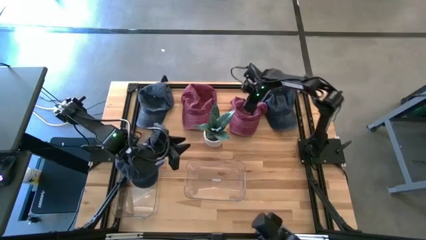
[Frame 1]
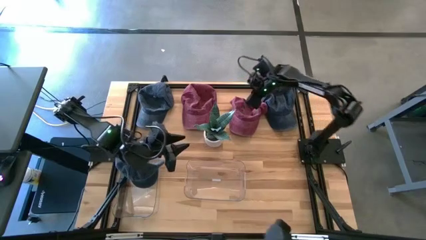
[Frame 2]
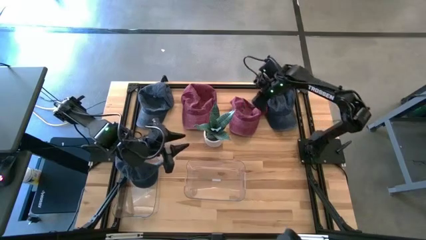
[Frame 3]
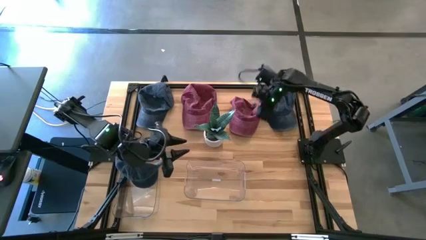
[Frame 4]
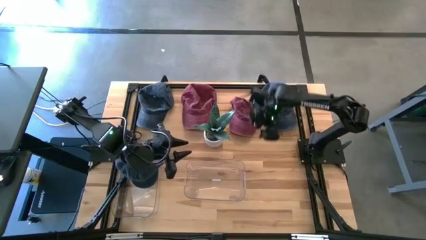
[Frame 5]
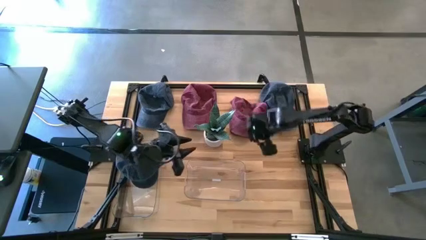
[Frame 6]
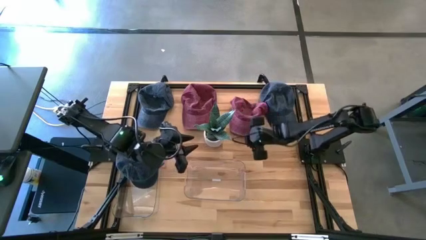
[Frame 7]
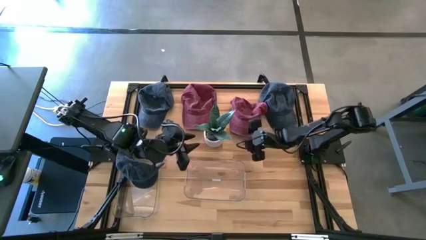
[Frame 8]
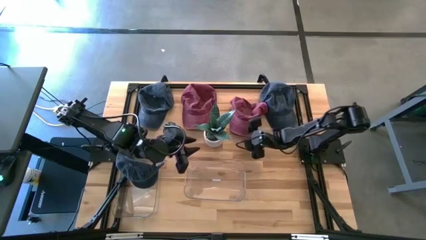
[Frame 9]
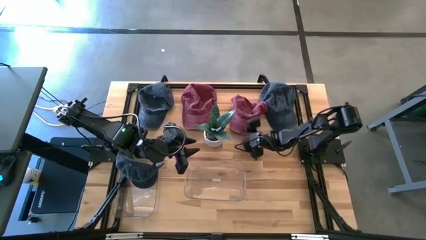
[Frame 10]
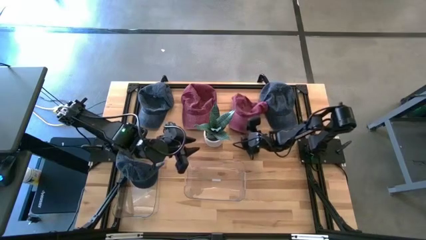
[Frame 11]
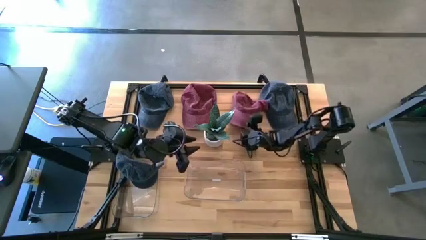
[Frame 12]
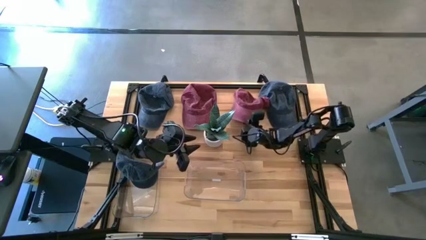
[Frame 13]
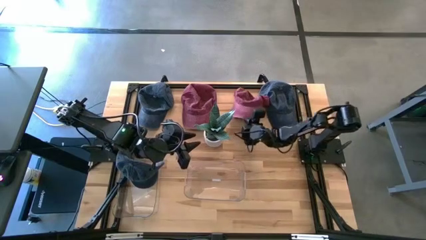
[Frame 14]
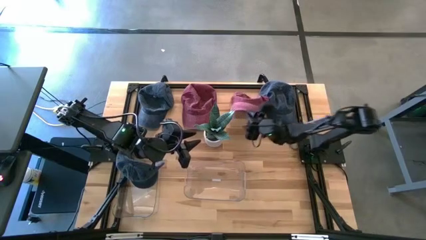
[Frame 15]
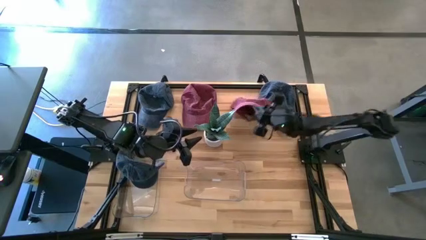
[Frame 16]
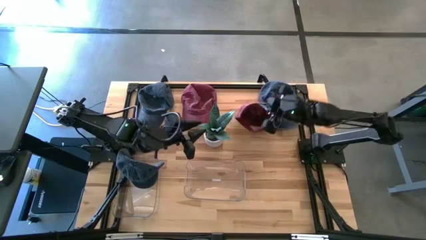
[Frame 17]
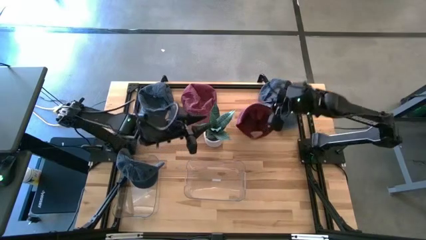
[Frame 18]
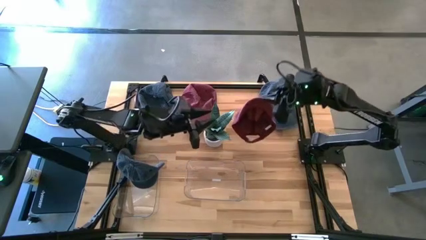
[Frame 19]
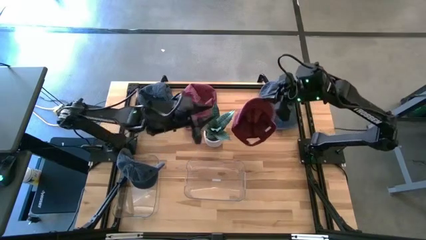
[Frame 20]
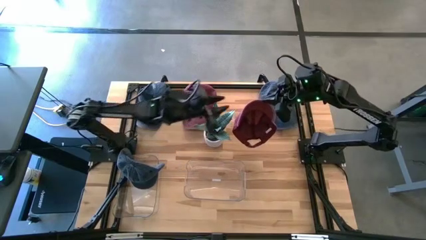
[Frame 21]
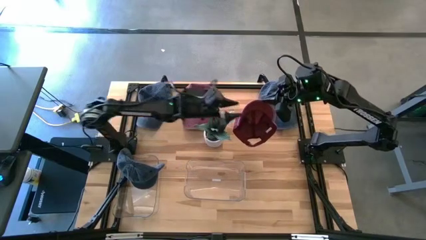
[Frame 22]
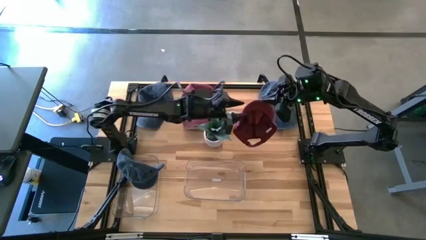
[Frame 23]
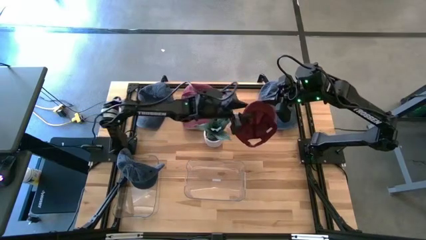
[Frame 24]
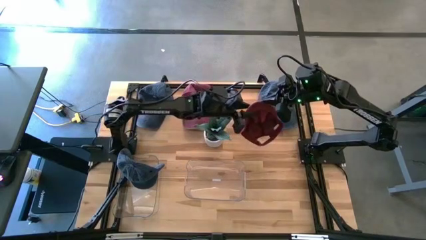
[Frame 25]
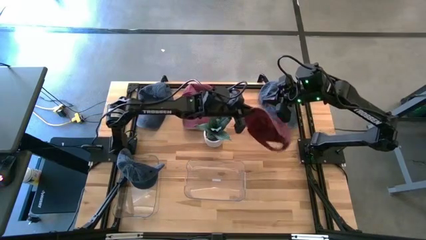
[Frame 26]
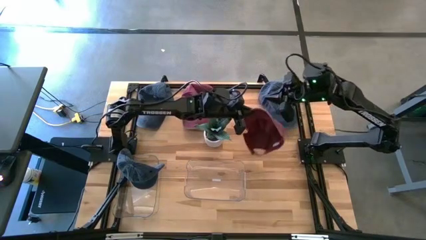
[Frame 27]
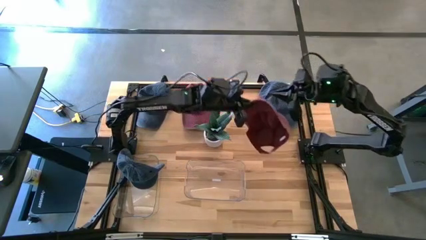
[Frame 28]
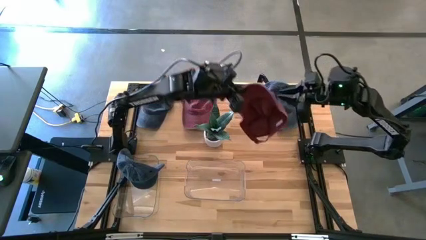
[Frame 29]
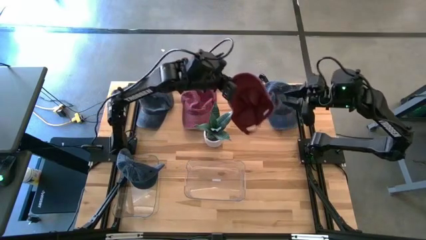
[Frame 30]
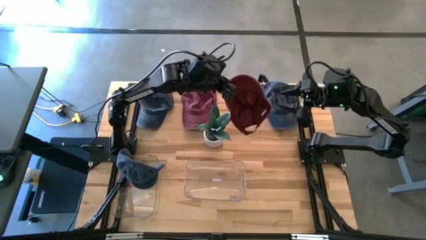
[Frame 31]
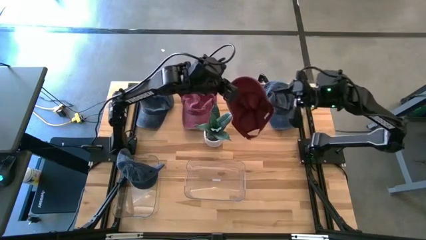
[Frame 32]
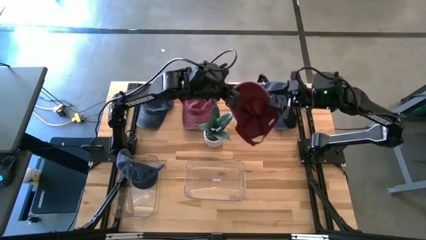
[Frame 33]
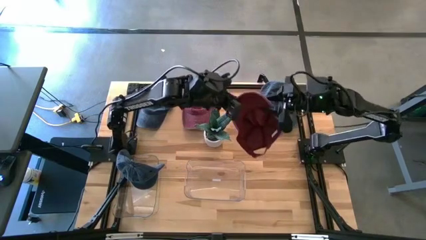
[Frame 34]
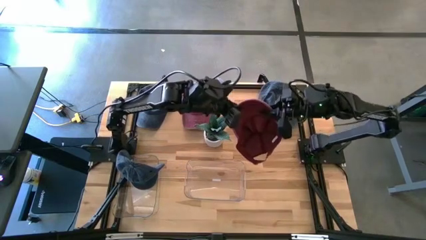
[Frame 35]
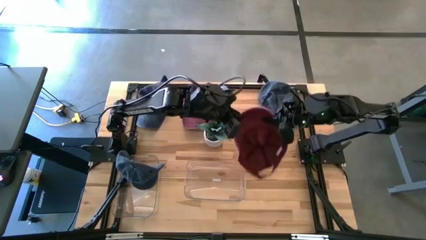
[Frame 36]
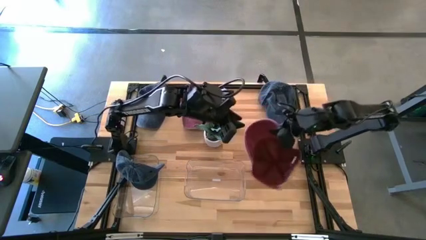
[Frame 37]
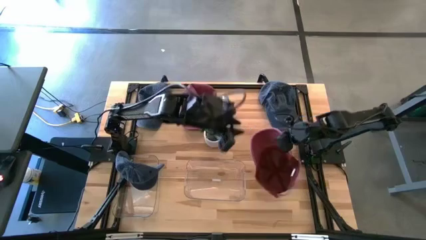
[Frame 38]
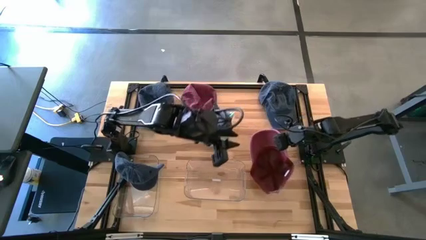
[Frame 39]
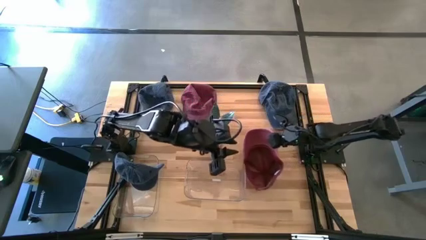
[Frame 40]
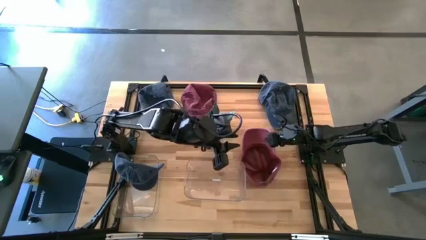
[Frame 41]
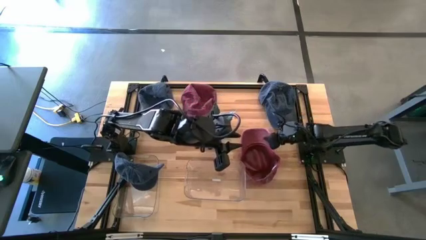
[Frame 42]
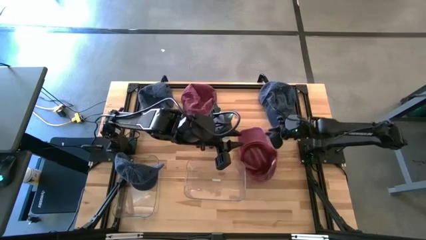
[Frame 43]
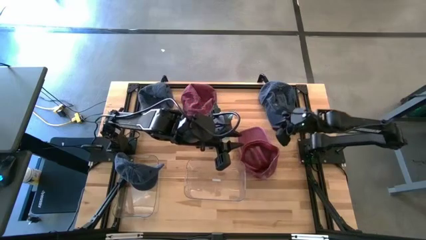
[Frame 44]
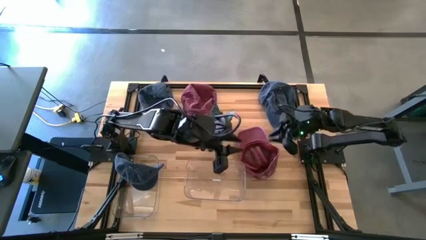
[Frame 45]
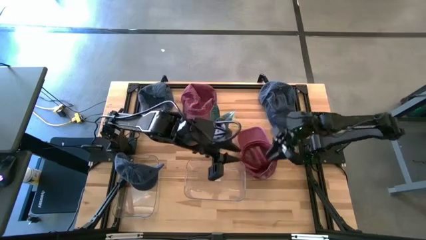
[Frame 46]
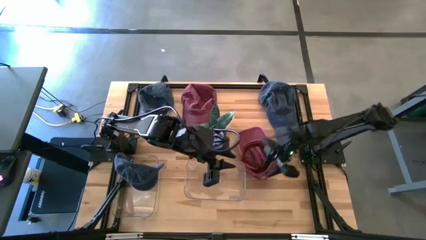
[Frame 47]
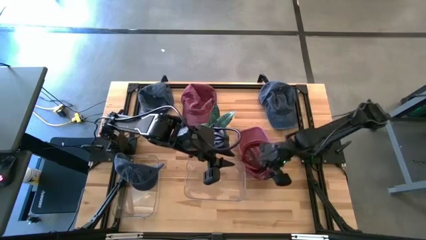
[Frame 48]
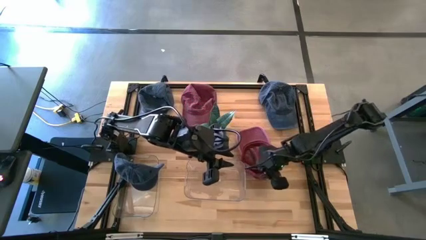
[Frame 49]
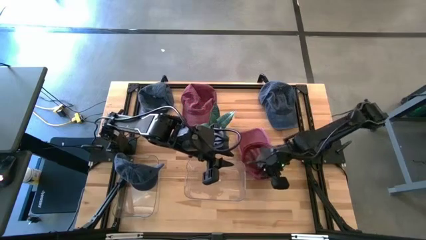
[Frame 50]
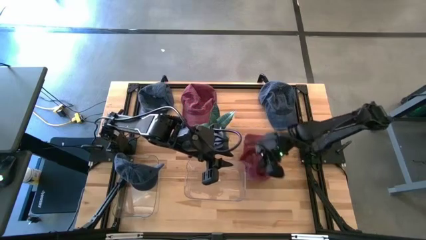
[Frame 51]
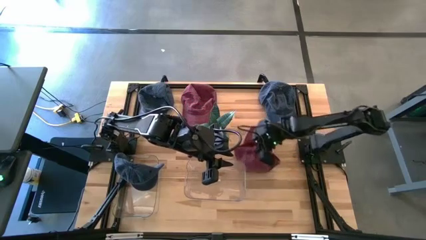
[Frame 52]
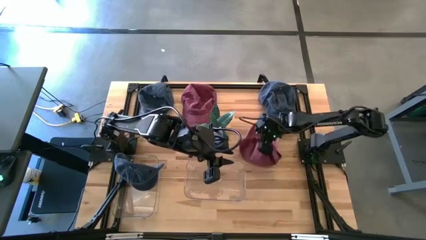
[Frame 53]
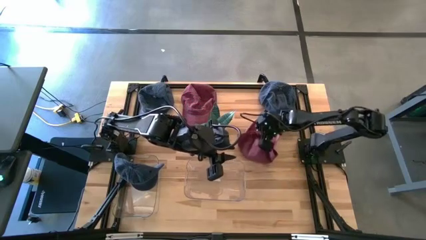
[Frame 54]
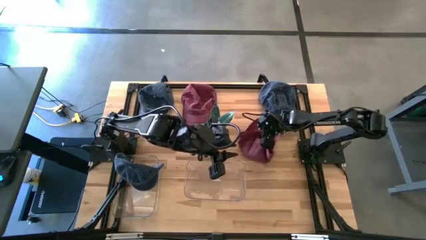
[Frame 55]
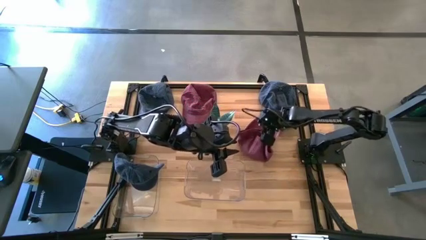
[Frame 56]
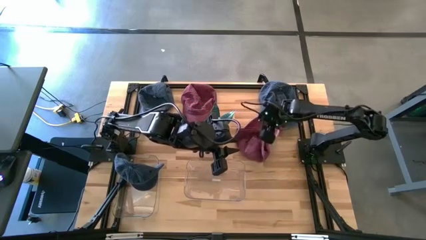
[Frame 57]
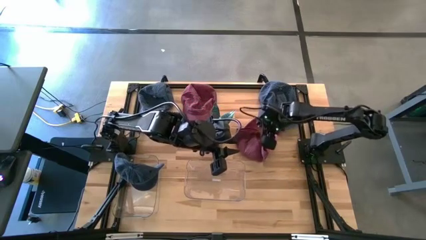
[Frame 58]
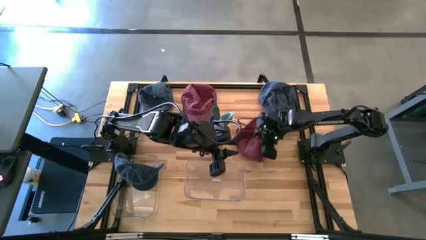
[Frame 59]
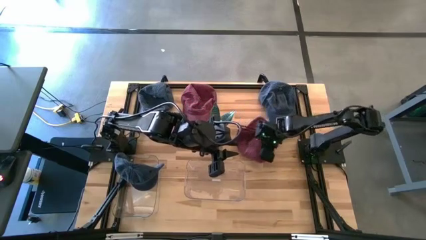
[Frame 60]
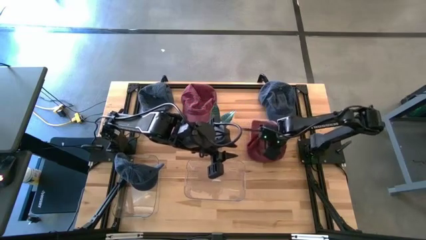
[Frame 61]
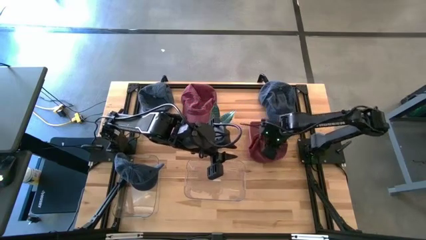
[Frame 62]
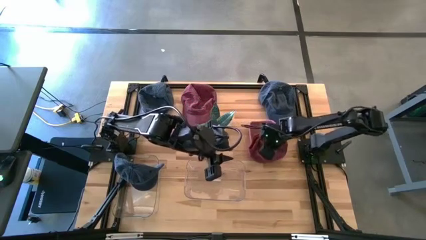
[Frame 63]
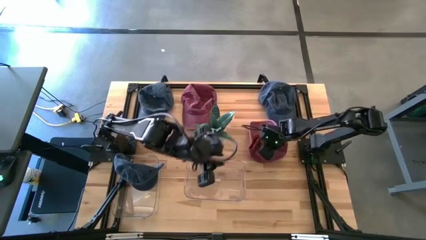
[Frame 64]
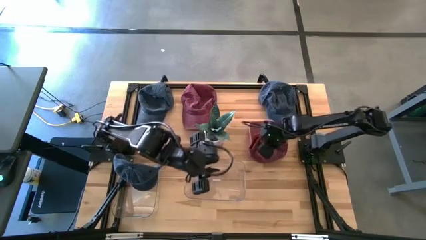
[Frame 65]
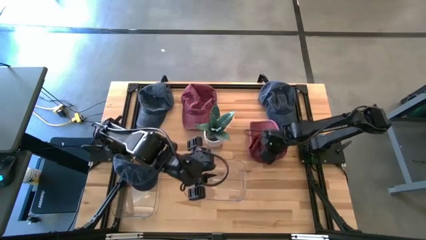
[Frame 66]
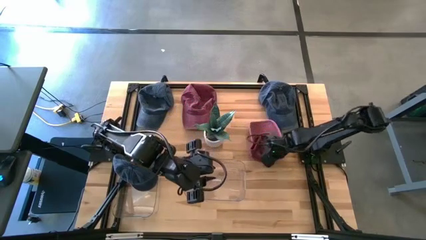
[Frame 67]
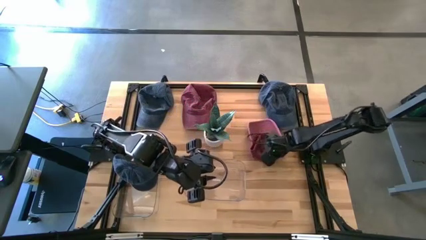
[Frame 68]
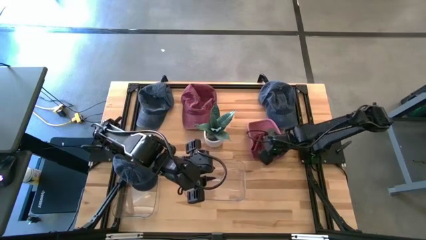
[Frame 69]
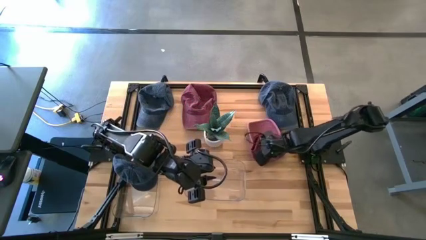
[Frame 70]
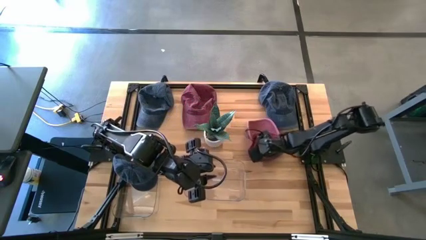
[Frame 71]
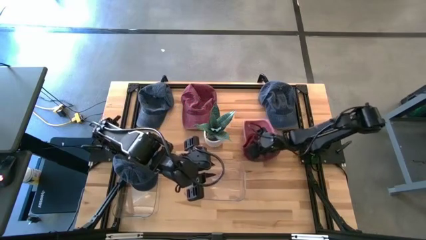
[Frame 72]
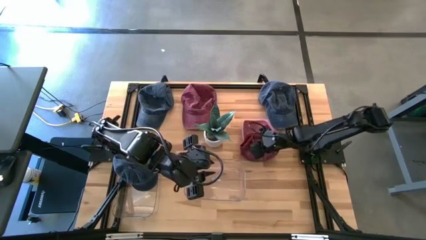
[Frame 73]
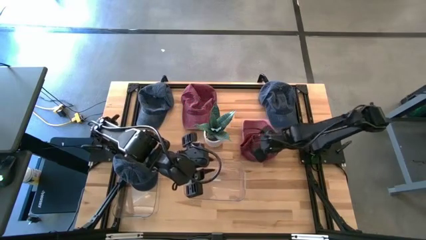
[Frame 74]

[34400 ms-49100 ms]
Task: Pick & Place hat
Put the right red cap into the right transparent bin
